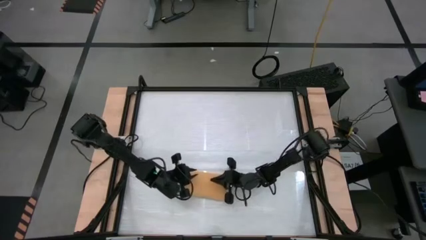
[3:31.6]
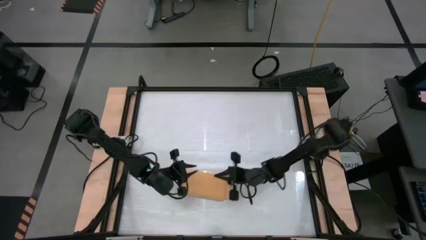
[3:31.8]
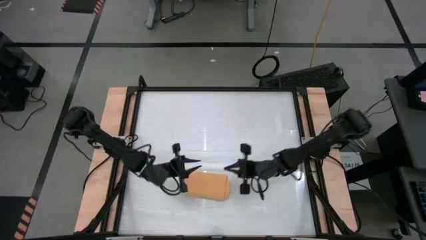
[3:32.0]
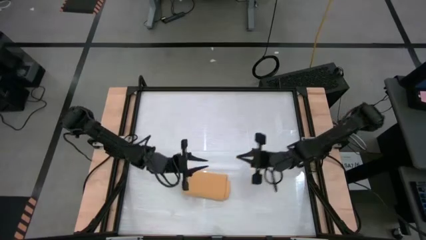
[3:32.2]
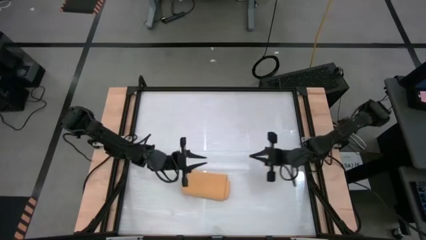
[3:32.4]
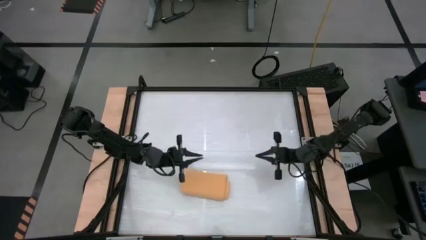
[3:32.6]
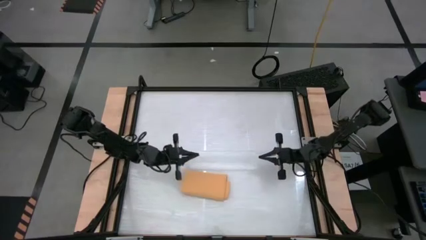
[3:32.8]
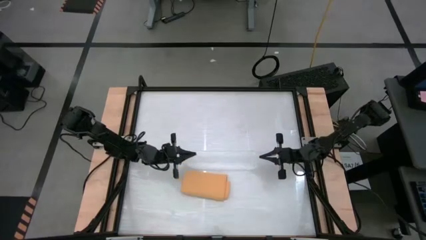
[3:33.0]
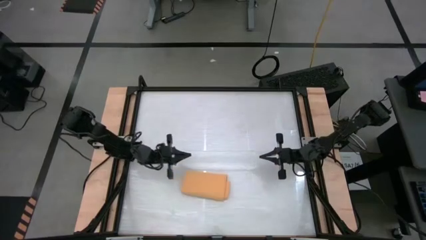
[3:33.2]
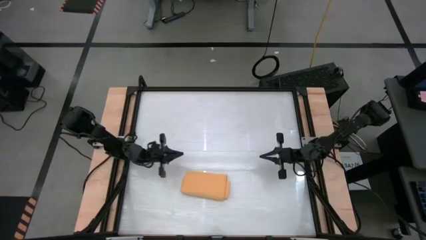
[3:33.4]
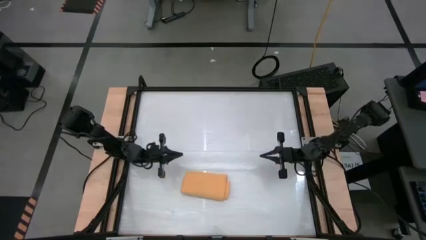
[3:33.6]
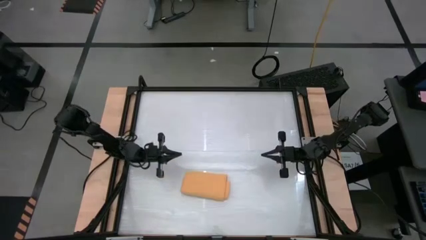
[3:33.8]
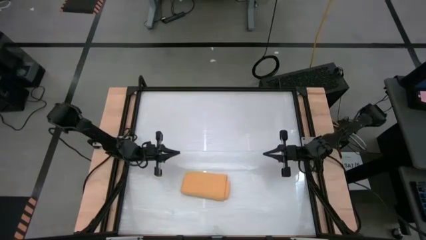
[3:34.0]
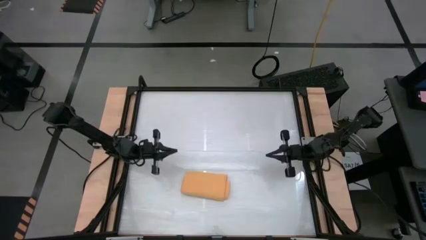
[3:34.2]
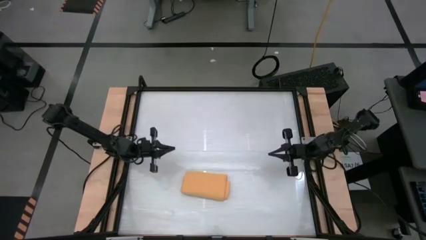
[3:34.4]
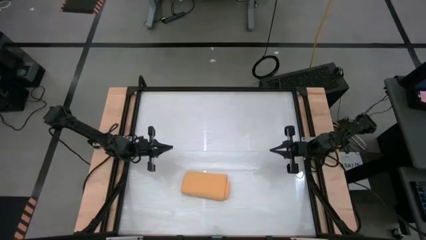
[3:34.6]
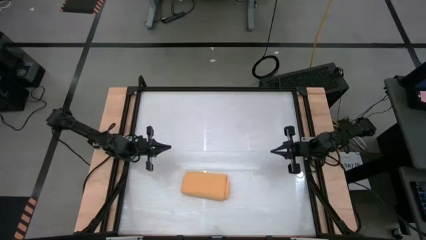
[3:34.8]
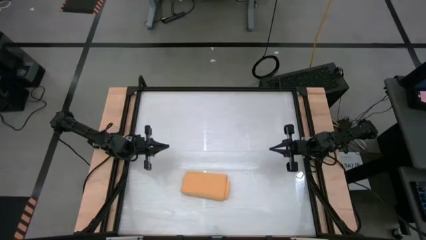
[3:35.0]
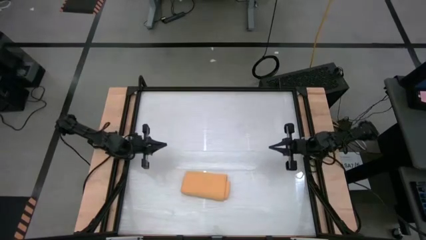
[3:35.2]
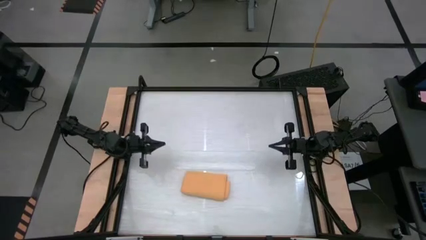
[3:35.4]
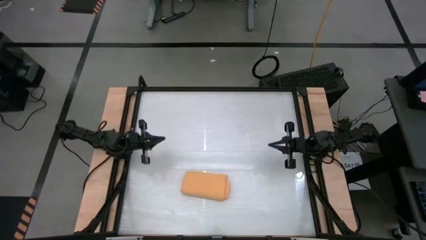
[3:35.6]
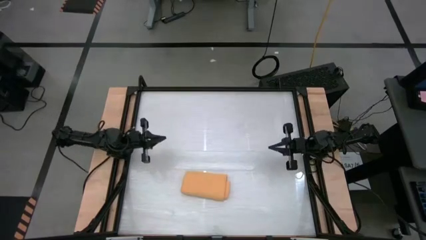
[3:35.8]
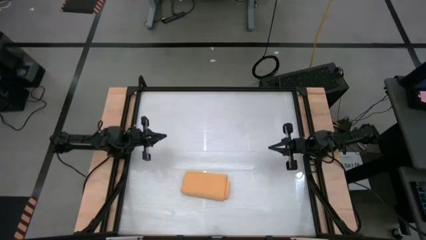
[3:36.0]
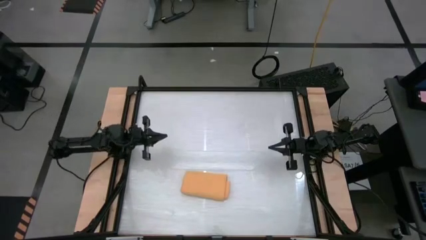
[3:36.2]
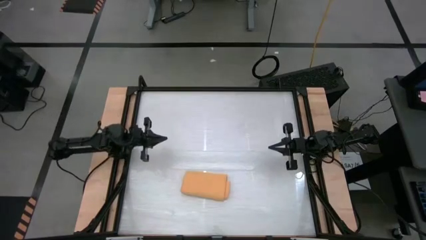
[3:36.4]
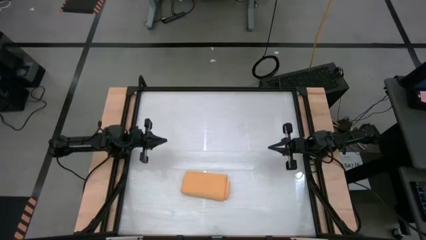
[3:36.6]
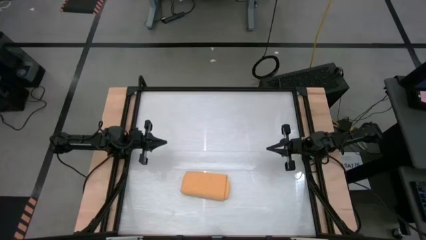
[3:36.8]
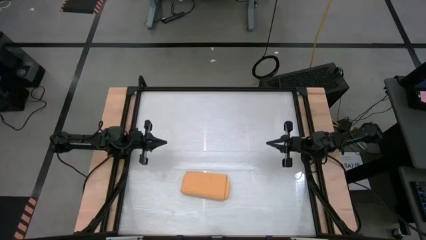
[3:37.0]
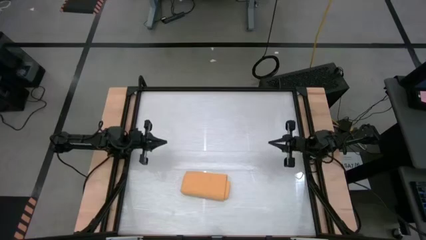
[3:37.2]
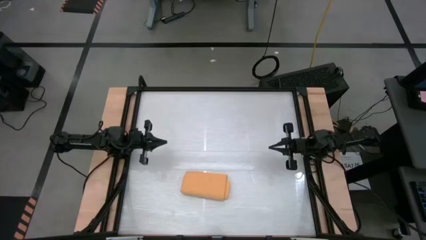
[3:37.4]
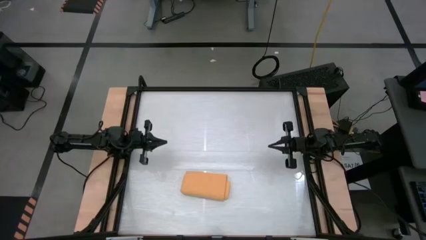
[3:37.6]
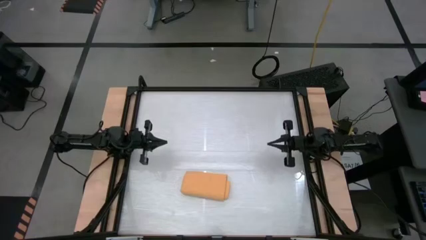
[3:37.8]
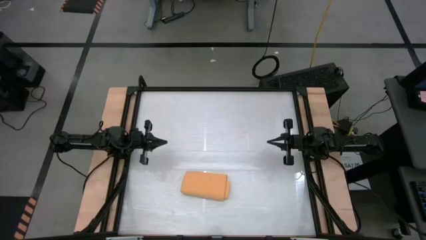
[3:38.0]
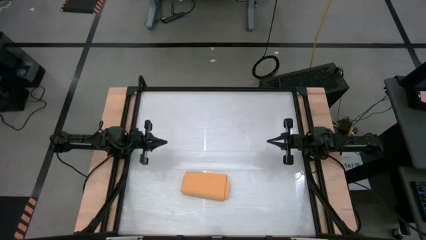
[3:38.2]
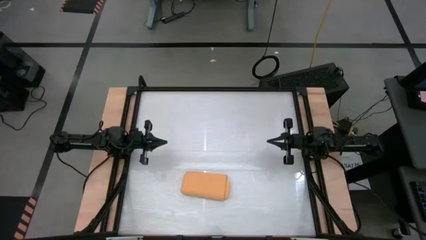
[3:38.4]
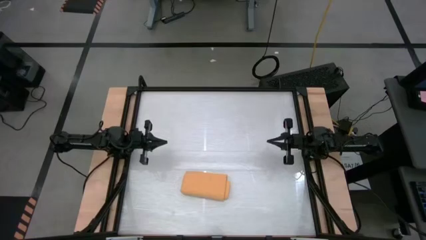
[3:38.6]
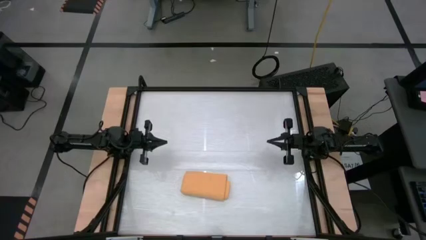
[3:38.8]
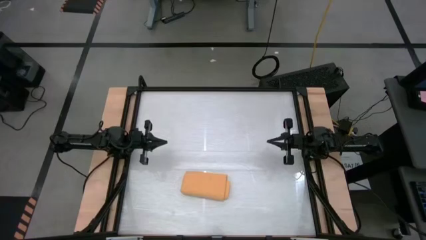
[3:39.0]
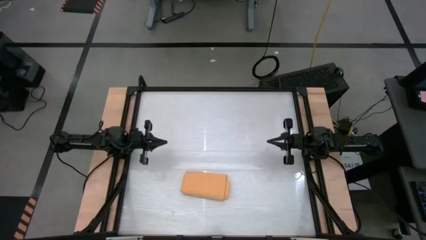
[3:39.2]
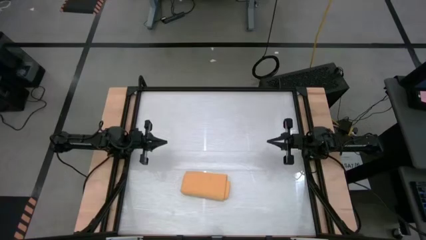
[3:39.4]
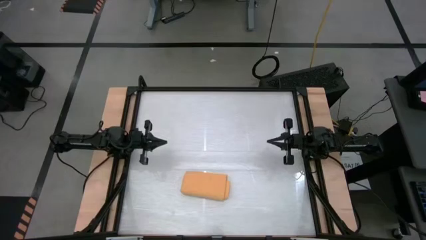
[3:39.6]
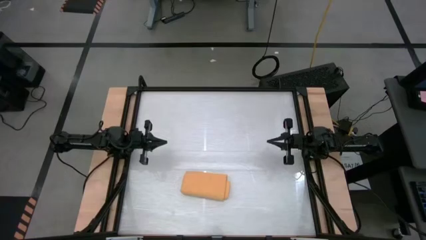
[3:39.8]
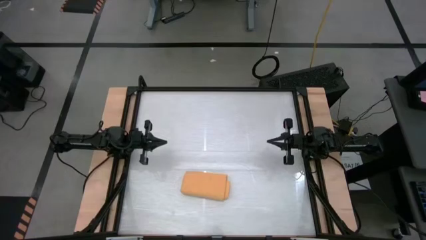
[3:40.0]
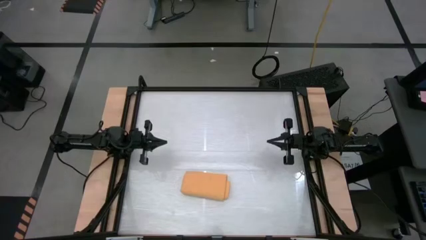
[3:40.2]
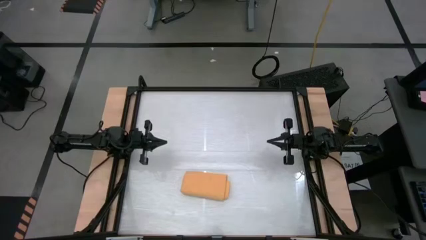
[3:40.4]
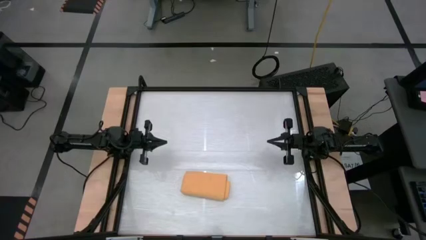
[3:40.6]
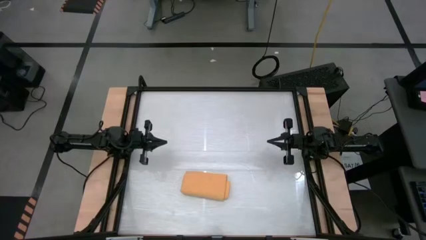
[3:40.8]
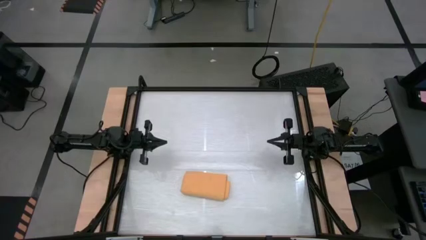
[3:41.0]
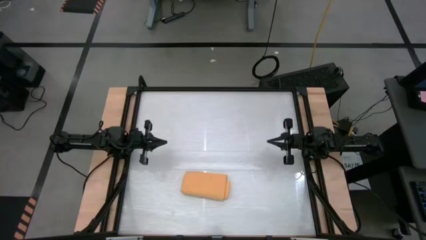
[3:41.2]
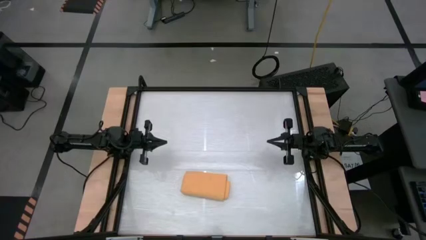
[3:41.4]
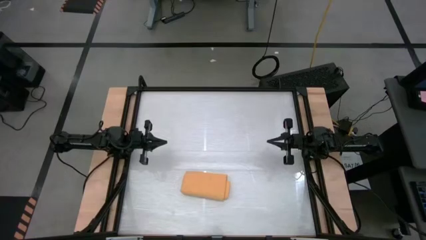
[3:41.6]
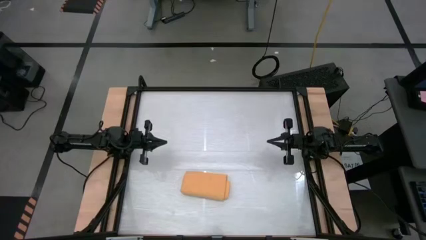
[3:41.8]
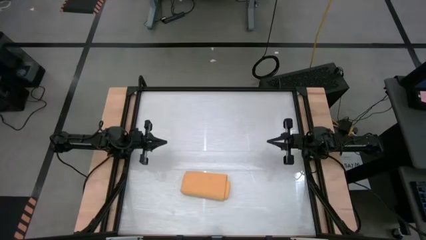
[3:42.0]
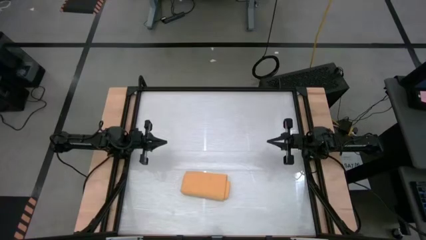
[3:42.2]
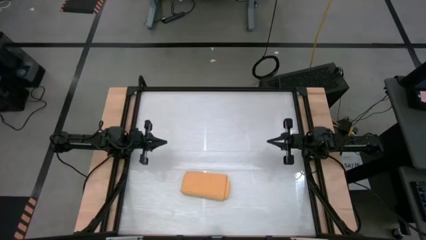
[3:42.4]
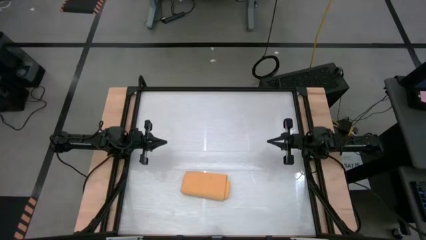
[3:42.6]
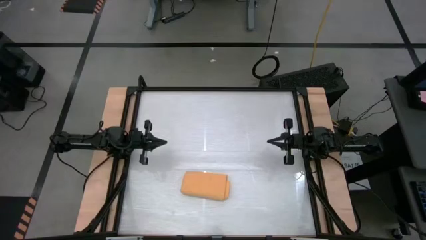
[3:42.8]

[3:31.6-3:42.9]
Task: Roll towel
Return to Home Position
